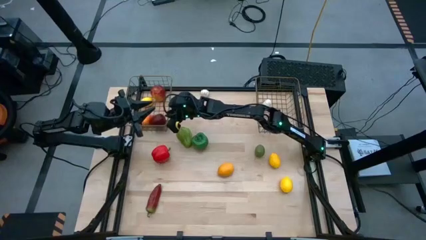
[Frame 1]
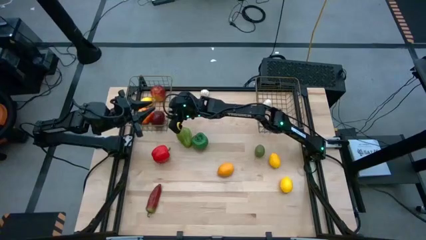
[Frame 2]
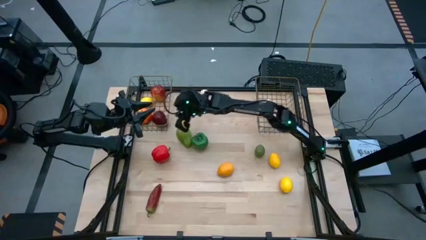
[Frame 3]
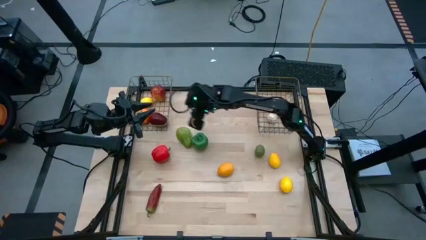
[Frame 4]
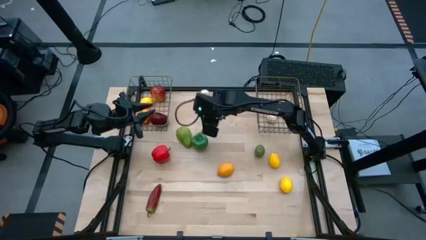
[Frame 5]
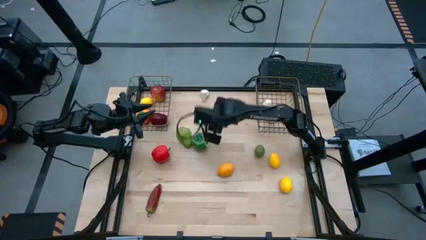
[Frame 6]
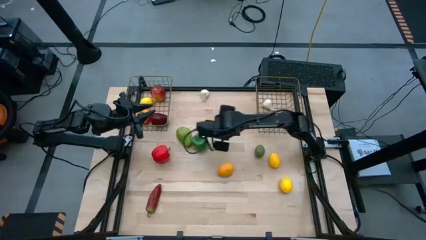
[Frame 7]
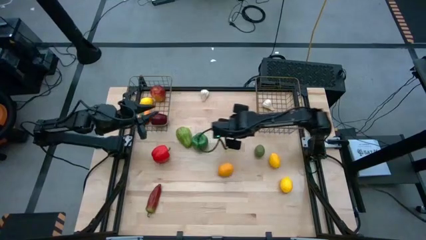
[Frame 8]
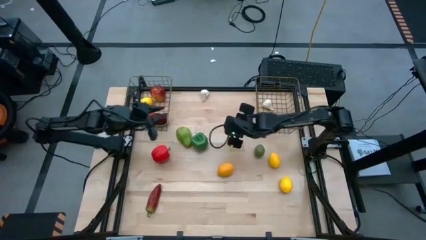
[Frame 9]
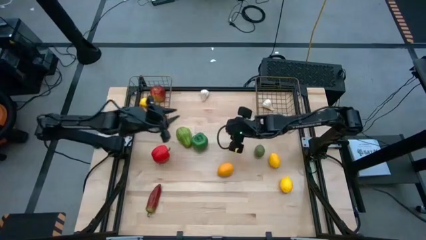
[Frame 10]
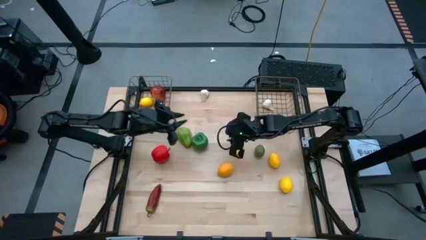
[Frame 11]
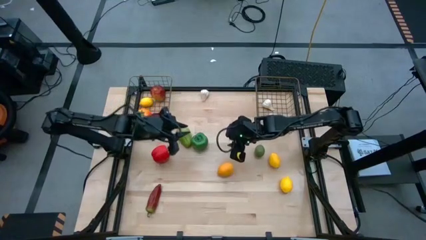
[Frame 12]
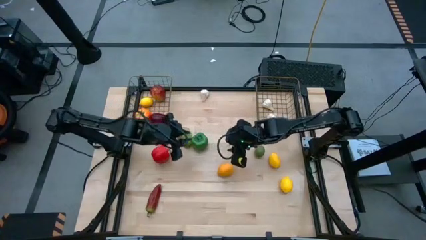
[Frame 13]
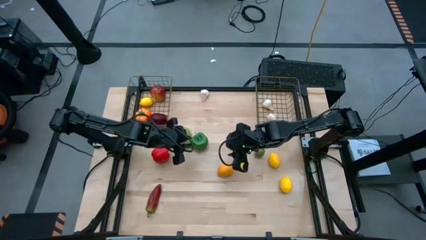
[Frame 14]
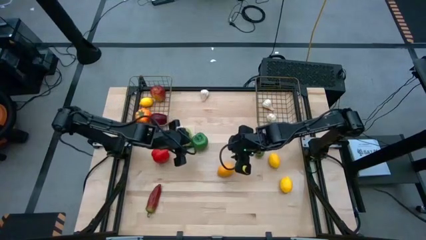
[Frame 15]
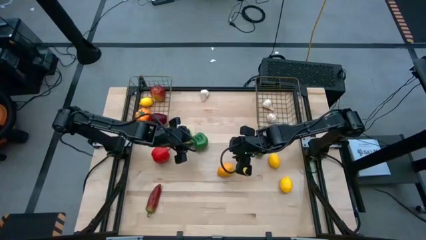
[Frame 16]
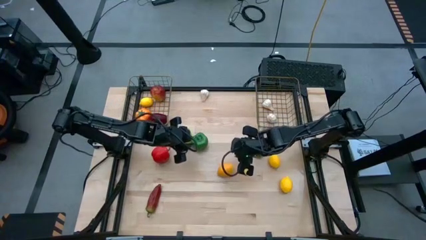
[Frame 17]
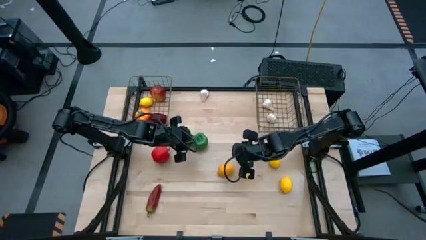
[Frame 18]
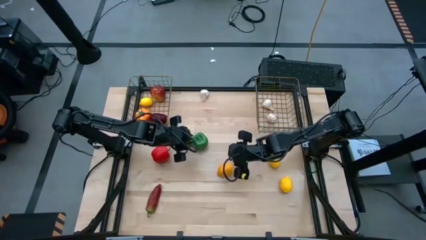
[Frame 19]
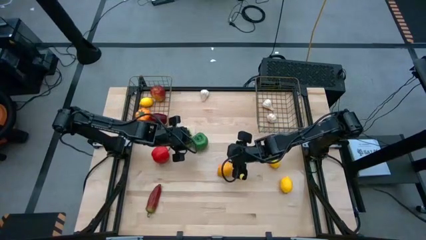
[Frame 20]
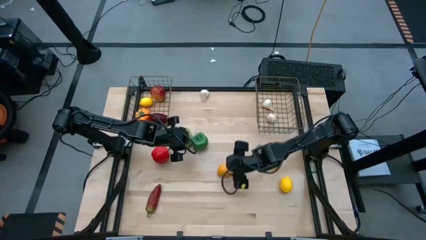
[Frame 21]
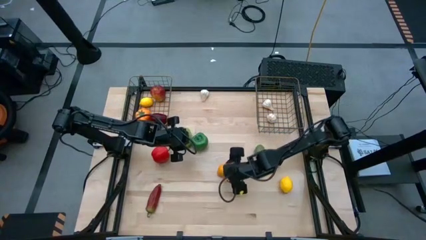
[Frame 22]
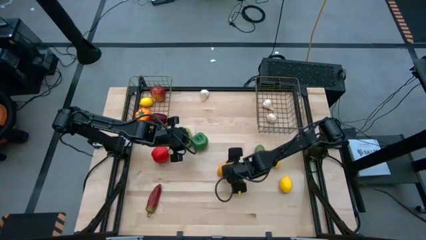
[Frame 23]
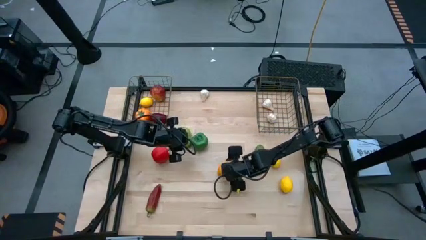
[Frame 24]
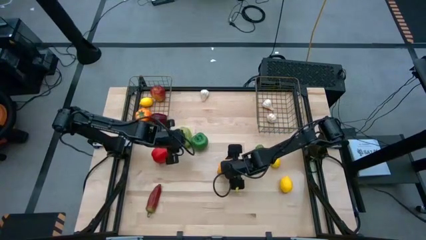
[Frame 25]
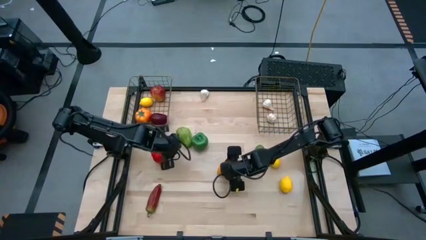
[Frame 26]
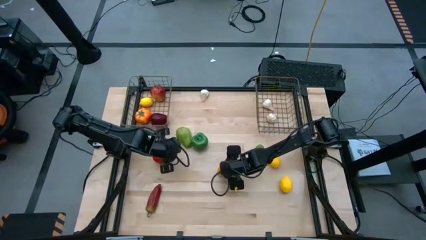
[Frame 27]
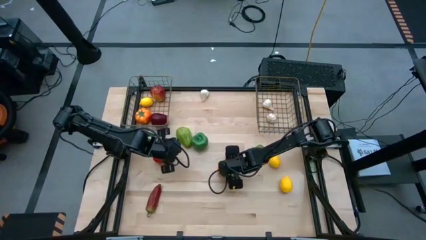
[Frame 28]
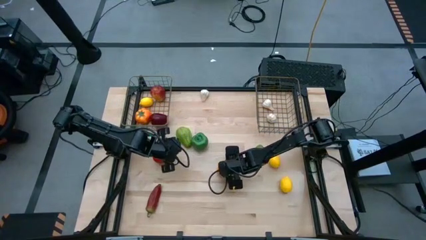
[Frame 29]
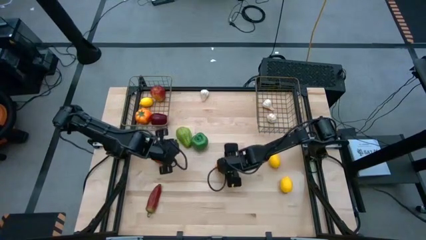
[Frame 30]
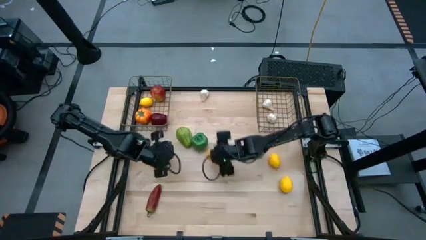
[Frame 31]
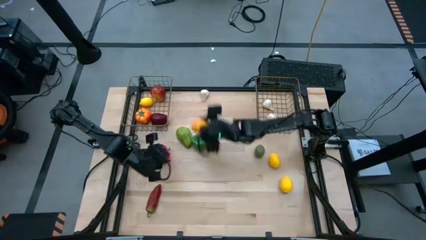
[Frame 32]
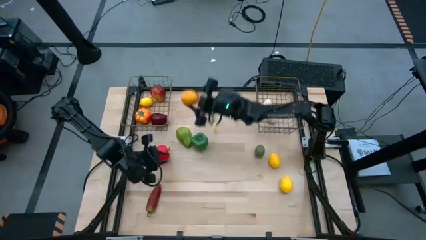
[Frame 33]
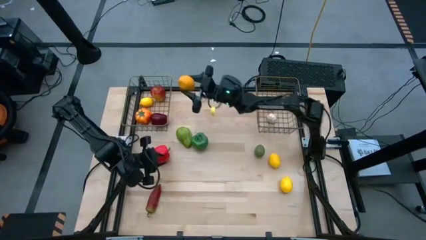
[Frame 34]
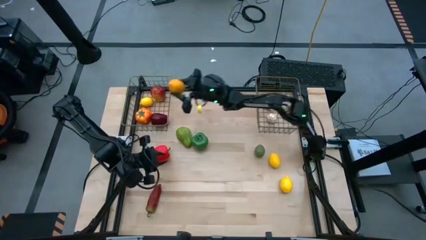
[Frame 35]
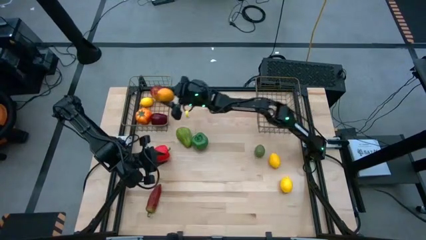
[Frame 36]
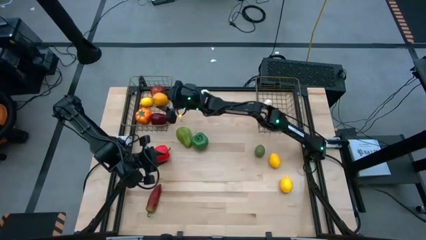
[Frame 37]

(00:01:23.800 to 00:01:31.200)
Task: Sort produce into baskets
Put the left lemon into the left wire basket

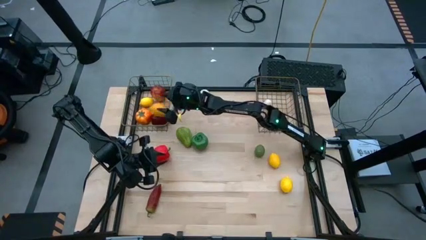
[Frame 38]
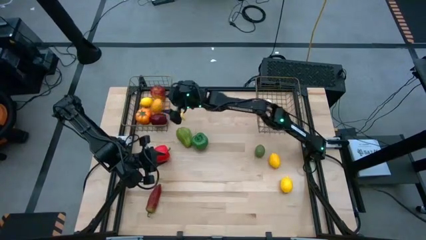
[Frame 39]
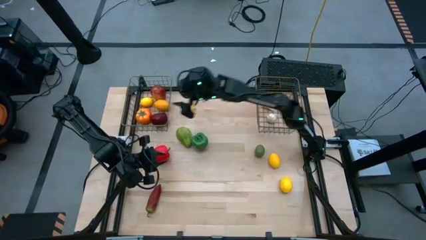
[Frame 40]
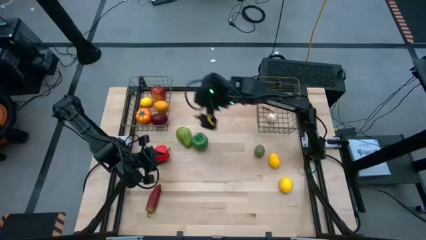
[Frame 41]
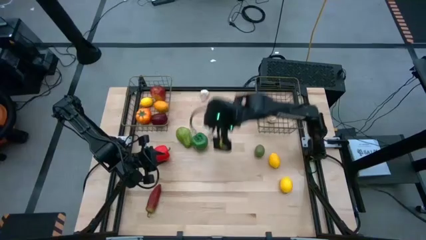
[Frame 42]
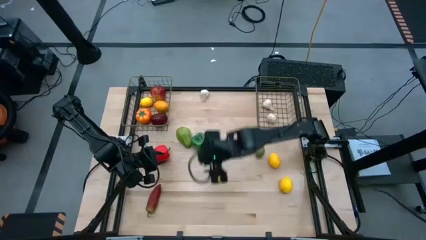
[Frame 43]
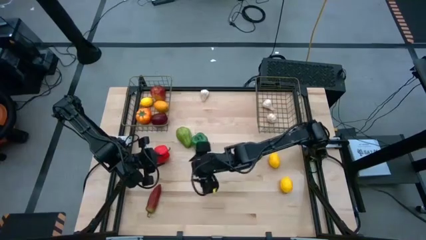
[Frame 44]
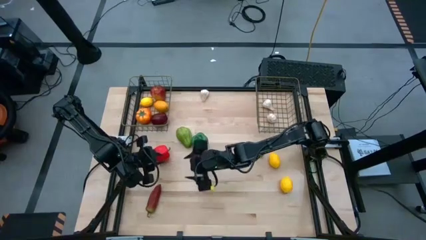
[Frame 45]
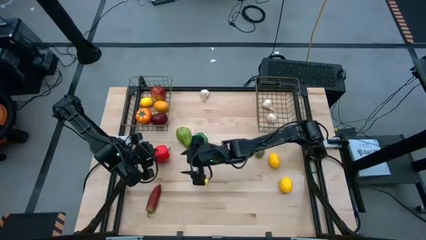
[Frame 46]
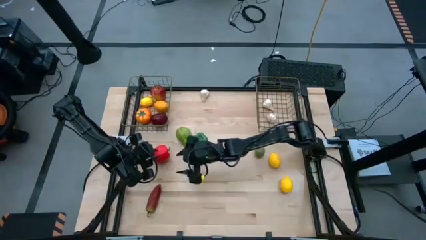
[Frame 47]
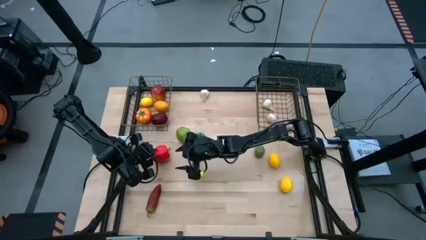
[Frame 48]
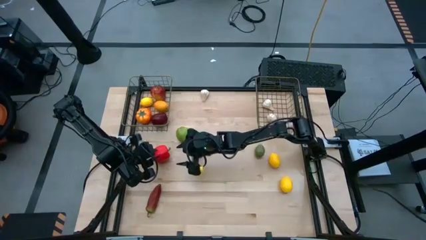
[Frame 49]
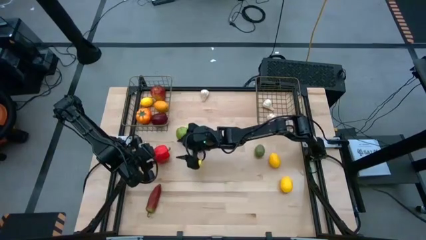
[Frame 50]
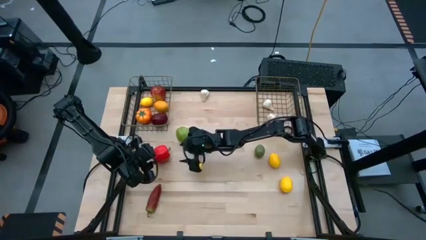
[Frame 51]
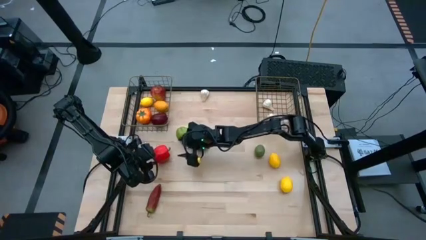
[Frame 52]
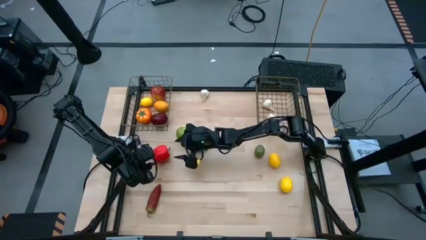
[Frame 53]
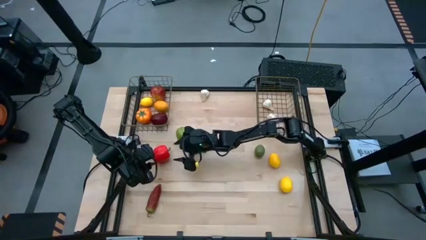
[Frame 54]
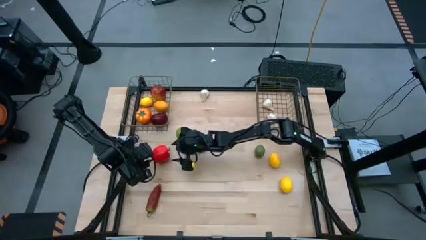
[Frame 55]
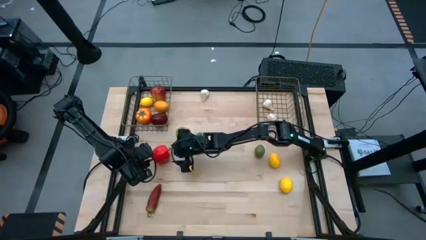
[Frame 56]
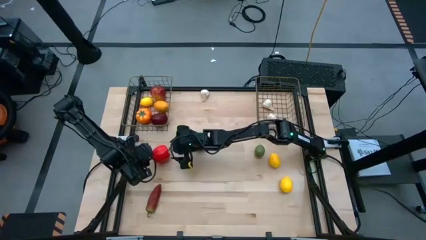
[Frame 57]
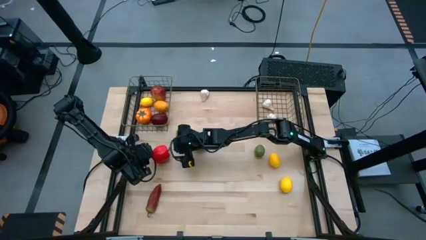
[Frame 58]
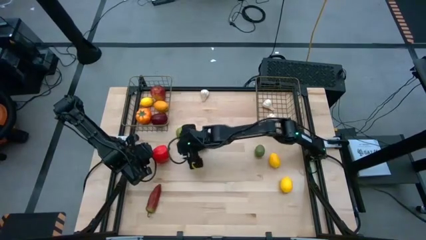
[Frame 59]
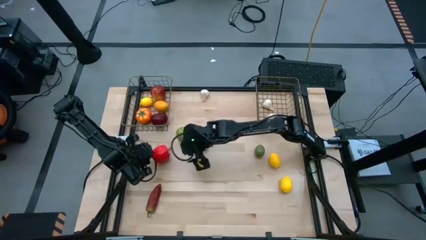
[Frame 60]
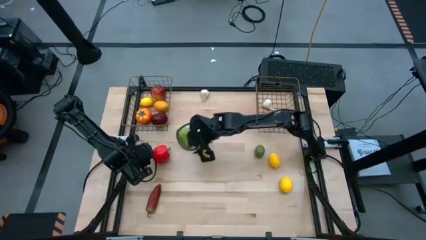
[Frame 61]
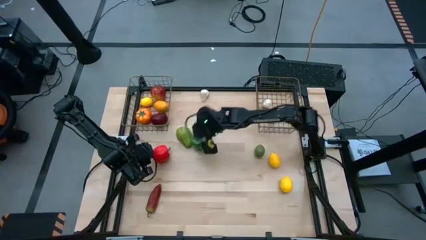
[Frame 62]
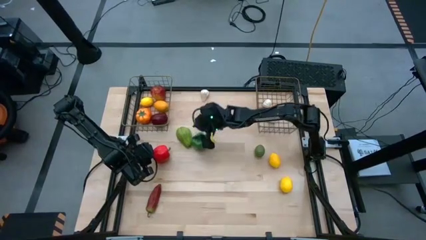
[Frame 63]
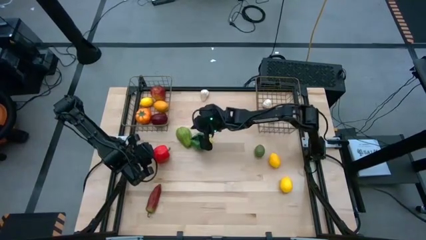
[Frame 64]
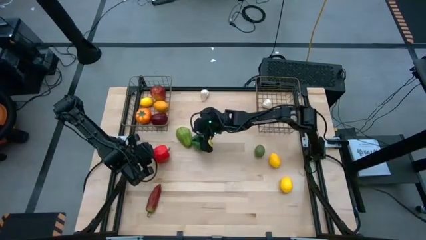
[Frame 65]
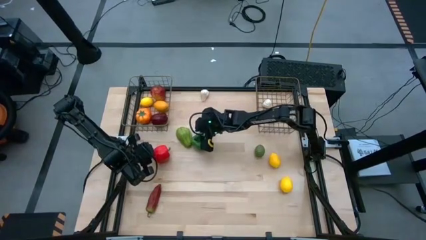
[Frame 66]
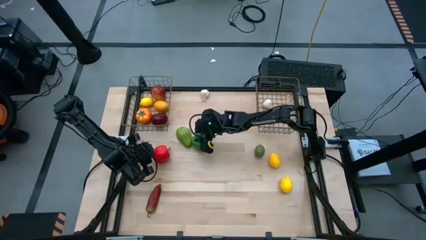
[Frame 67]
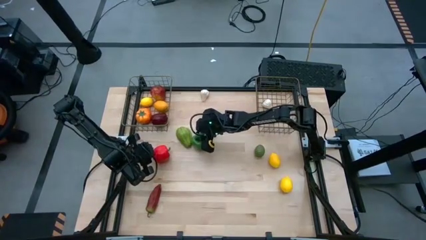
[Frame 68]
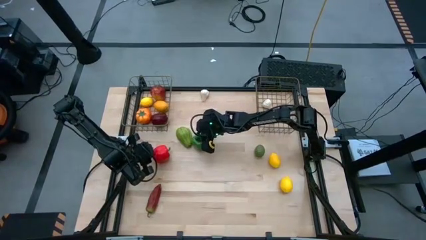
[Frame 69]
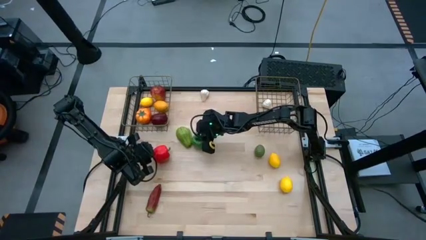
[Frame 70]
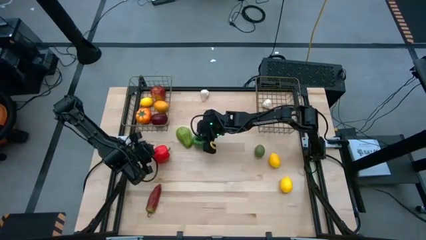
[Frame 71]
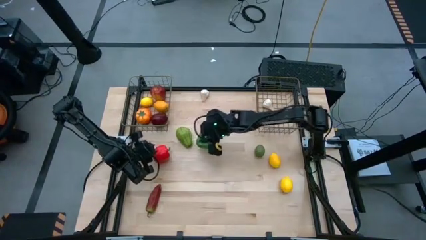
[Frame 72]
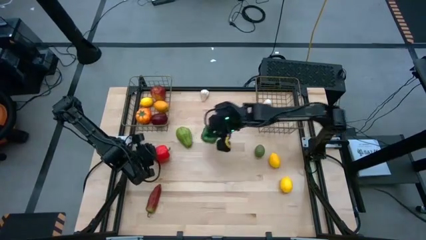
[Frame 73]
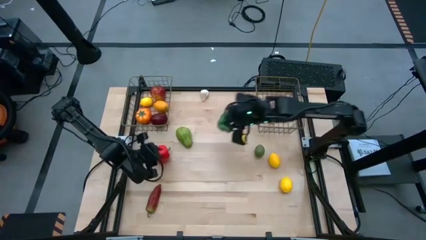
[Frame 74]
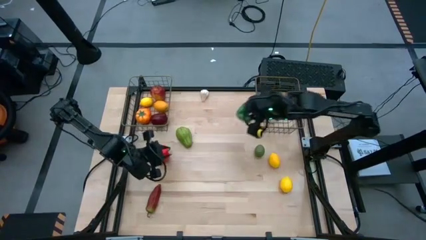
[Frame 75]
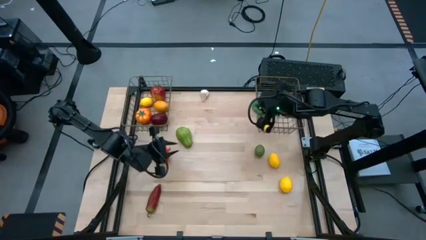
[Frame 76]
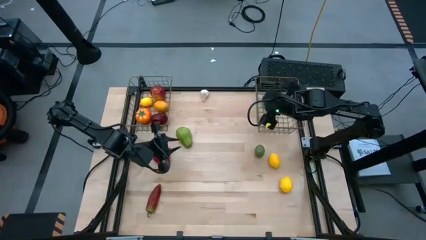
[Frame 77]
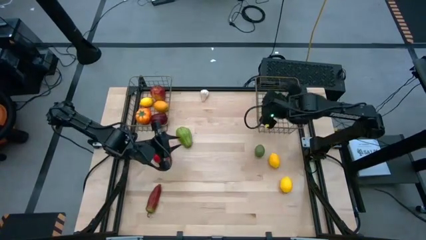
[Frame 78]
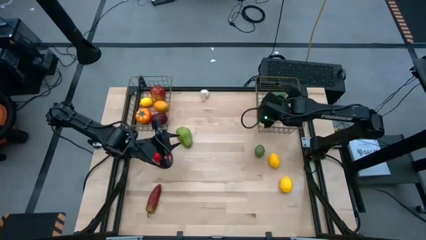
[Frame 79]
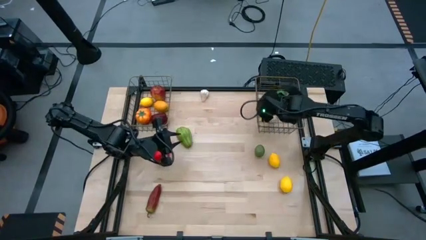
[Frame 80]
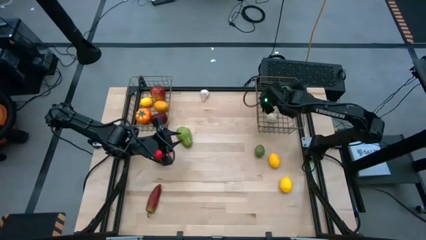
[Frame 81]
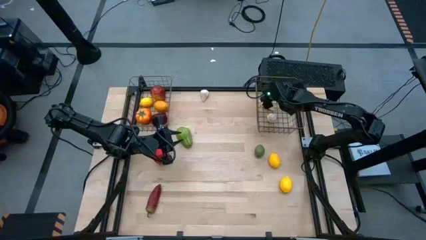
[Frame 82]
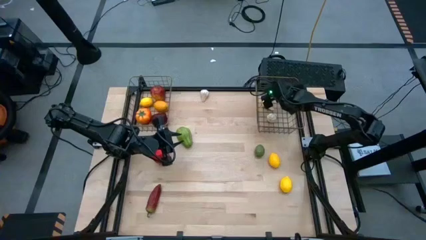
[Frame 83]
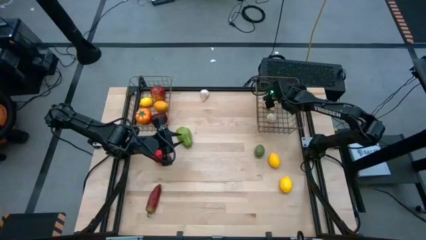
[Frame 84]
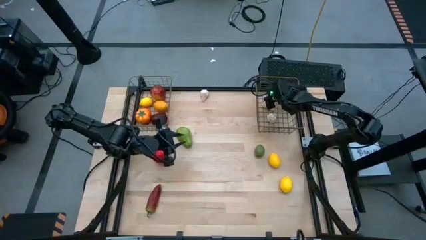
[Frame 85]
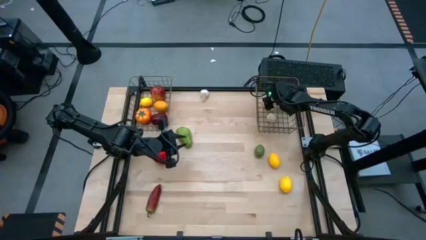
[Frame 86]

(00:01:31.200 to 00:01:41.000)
Put the green bell pepper into the right wire basket
